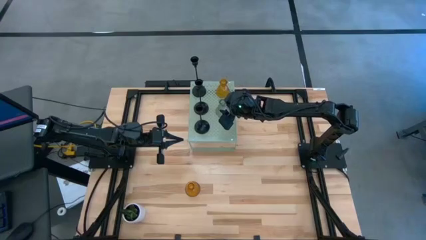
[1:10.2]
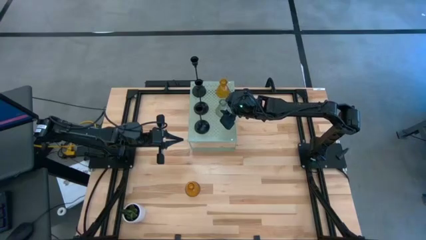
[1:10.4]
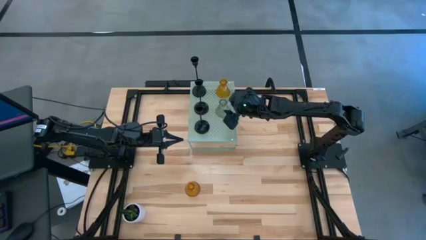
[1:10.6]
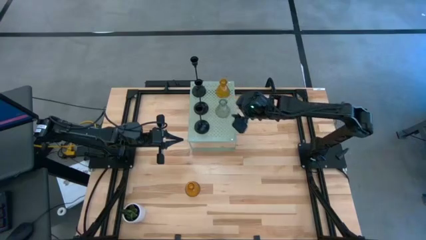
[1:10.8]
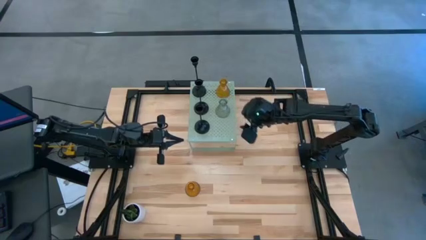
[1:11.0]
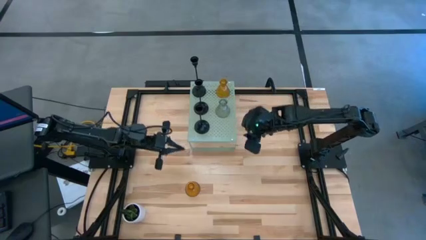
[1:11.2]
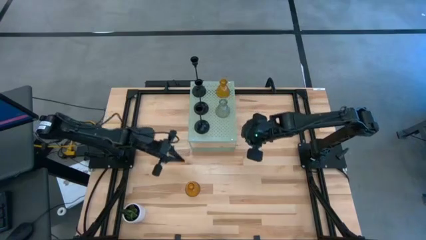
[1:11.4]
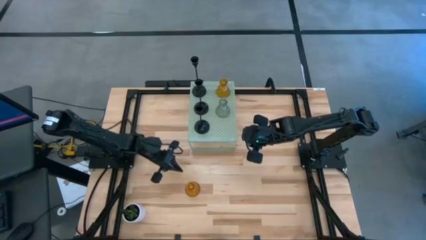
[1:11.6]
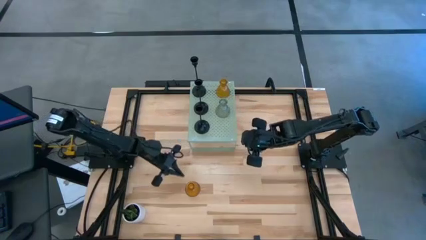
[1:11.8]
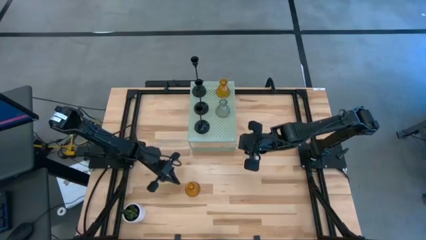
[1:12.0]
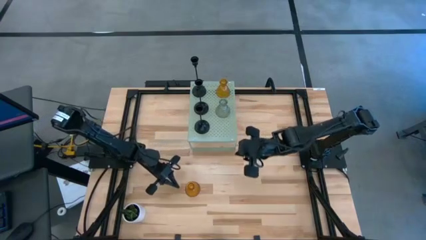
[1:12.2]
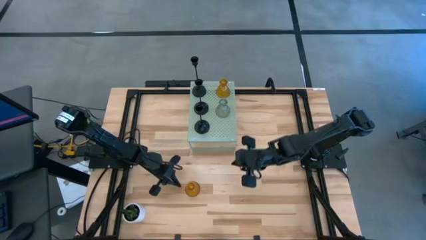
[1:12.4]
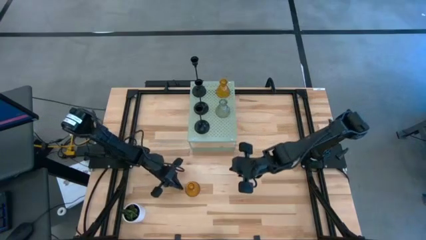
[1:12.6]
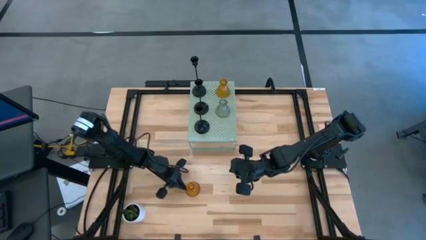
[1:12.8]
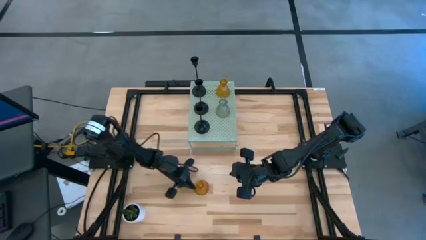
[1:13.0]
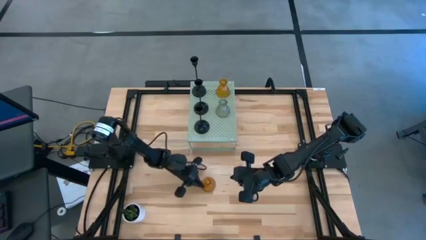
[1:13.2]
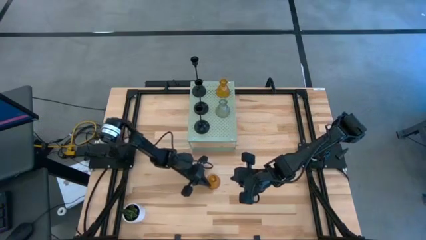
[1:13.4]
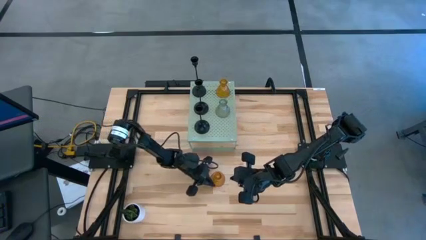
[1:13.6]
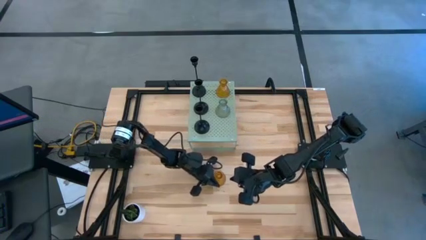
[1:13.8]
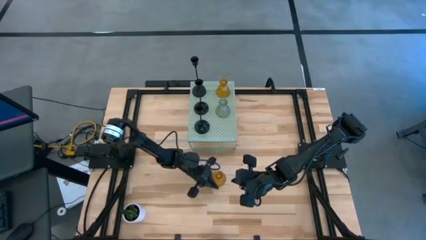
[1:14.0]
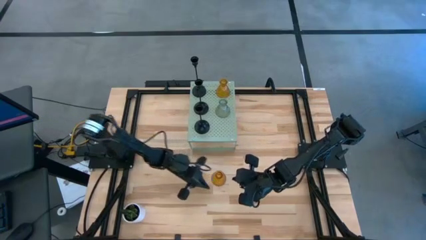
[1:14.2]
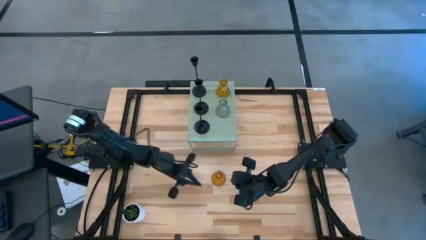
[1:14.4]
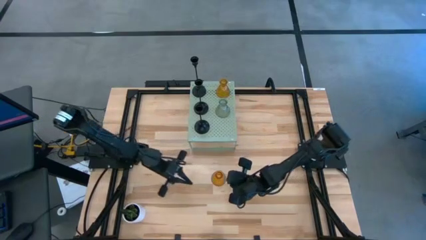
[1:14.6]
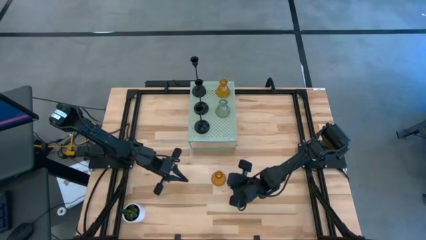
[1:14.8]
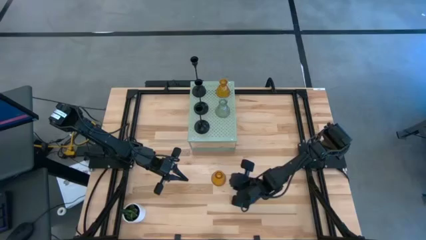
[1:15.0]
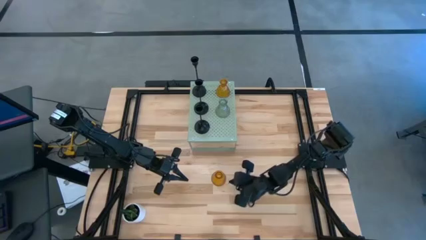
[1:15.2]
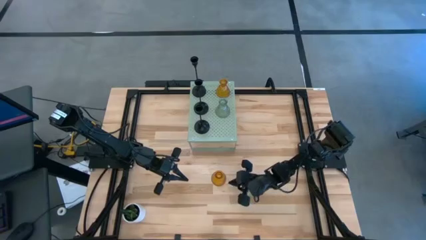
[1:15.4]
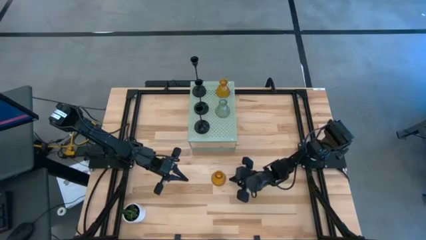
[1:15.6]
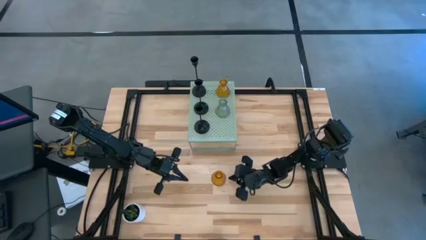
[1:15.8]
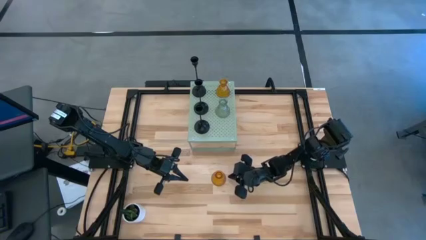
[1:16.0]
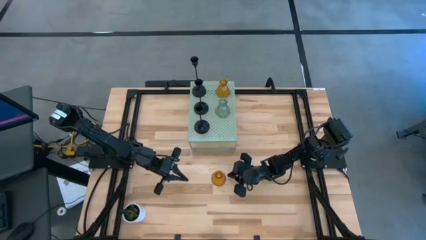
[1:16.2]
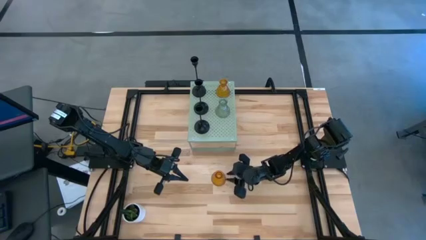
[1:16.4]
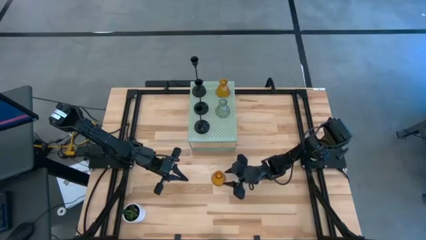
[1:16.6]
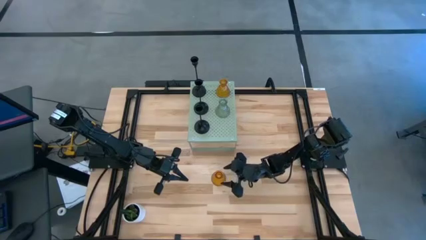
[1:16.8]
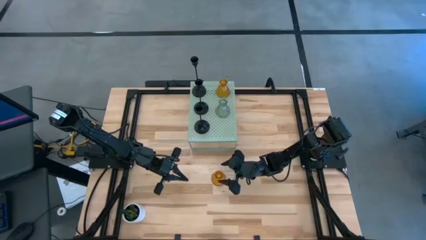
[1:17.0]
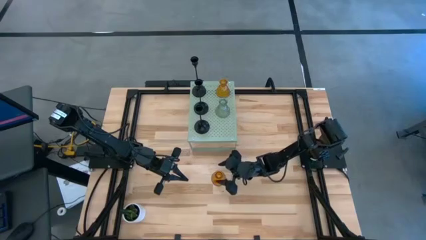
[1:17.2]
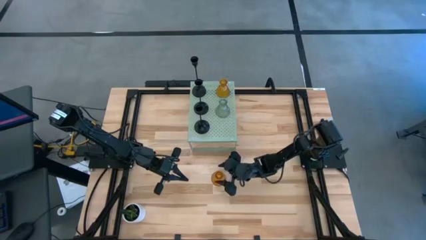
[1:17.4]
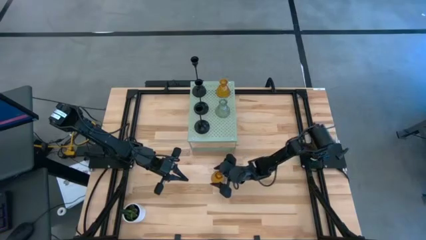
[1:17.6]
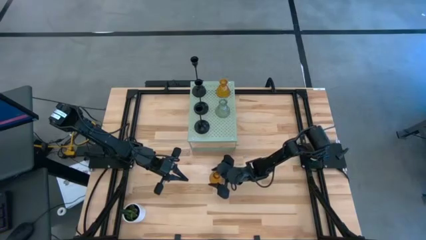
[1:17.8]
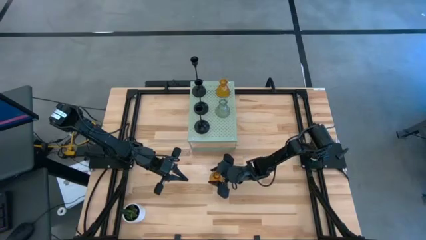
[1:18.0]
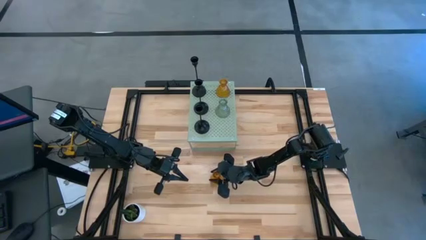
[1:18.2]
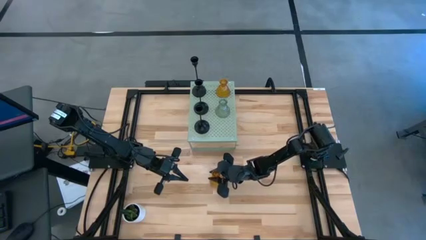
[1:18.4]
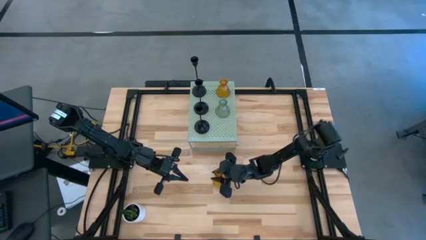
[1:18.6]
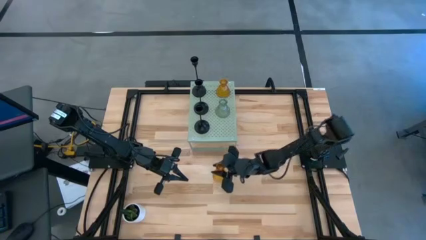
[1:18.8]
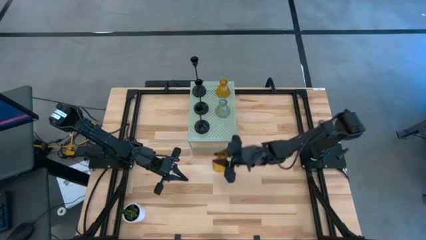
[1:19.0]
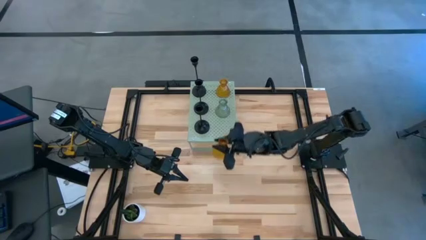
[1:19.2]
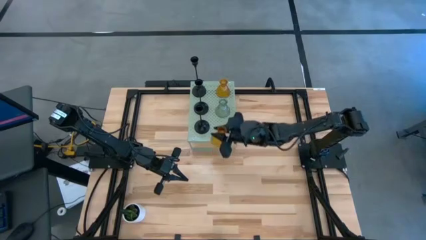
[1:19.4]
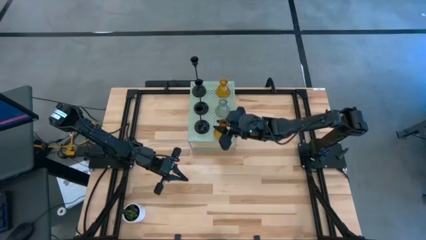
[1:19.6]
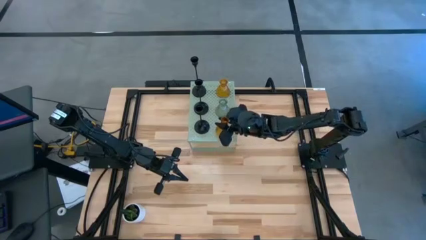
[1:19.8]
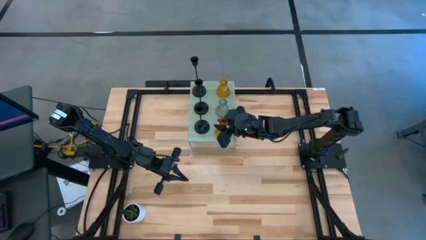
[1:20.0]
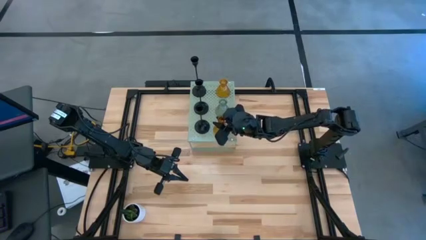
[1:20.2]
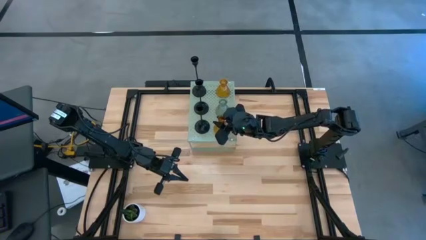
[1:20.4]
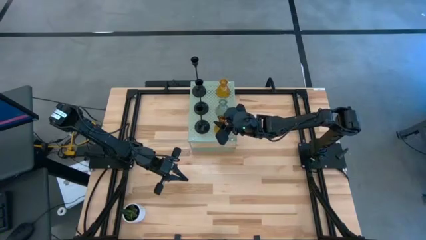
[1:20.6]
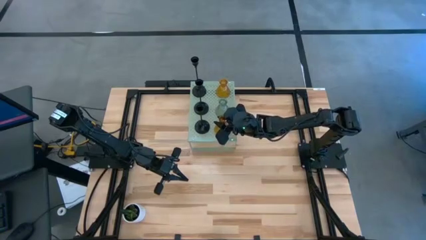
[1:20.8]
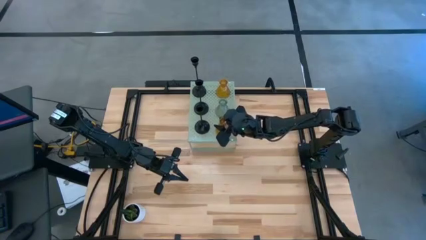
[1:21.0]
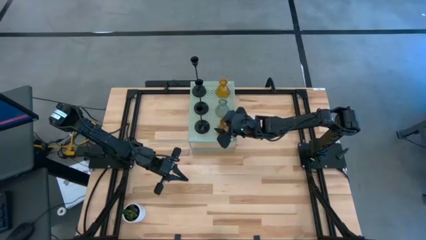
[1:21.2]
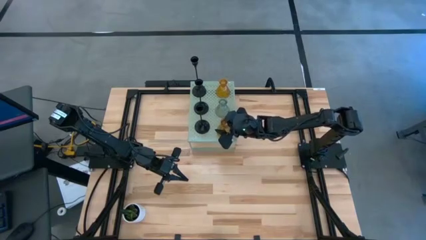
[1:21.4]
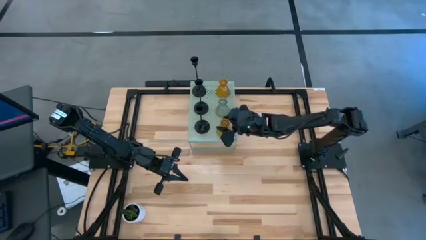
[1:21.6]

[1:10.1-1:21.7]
Task: Pick & Place candle stick holders
Put the yellow glass candle holder on the shelf aligned with the other green glass candle holder

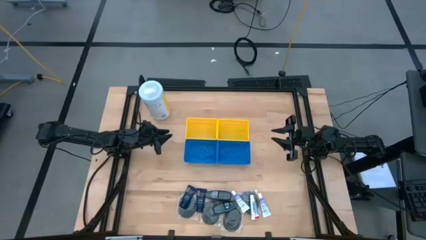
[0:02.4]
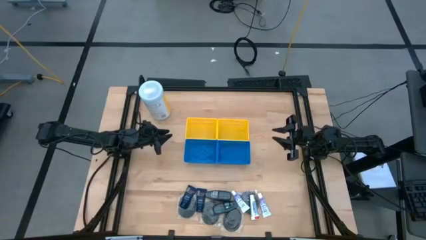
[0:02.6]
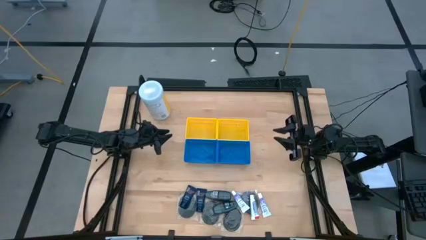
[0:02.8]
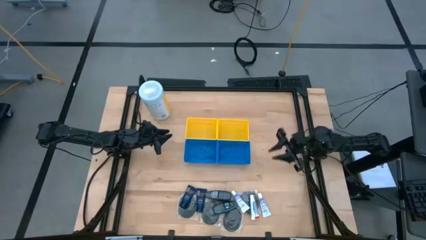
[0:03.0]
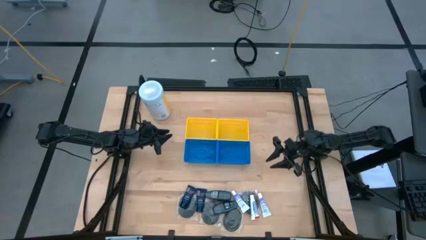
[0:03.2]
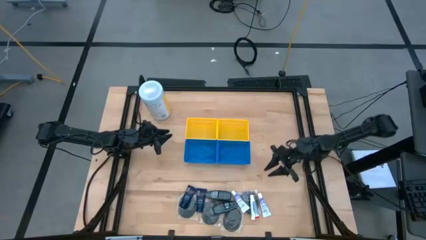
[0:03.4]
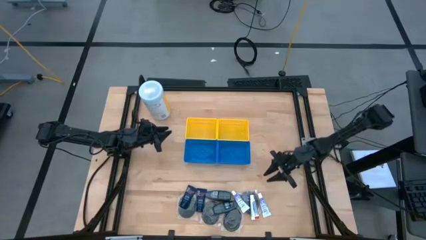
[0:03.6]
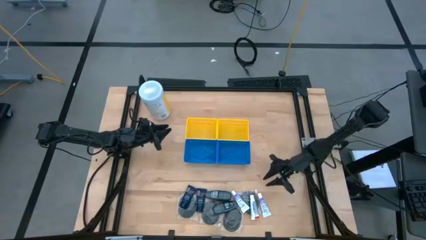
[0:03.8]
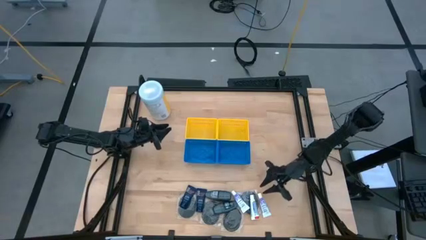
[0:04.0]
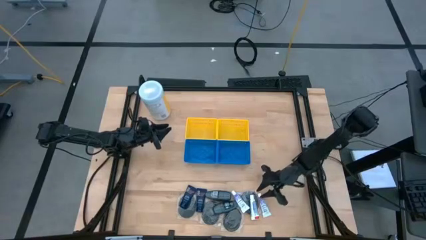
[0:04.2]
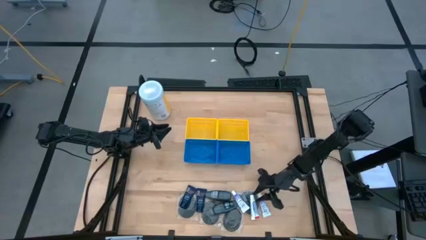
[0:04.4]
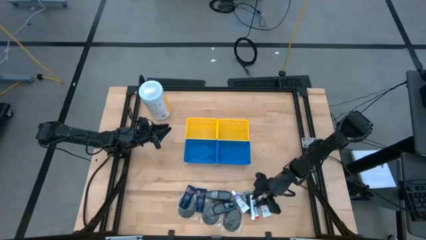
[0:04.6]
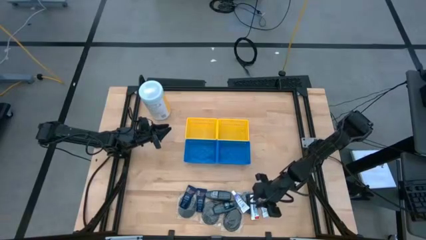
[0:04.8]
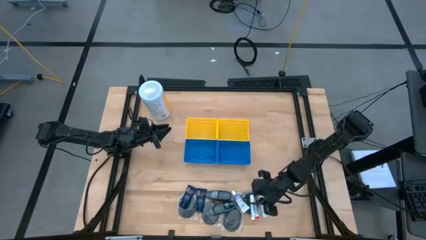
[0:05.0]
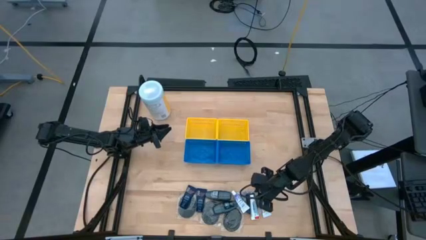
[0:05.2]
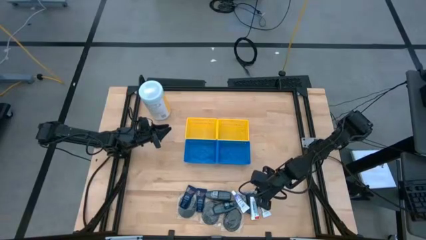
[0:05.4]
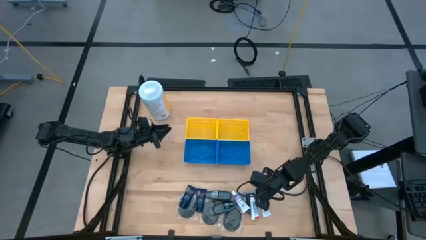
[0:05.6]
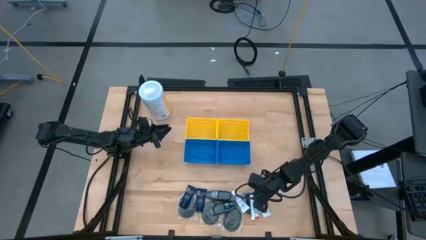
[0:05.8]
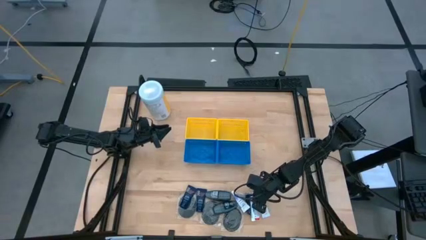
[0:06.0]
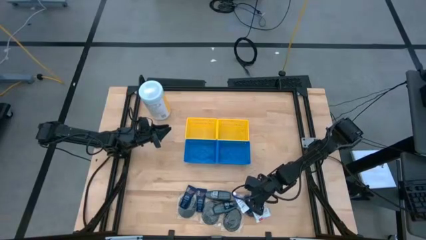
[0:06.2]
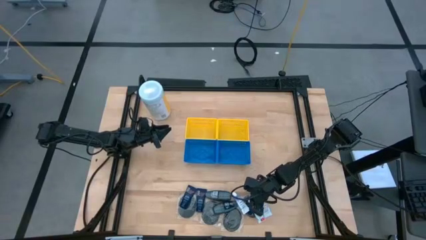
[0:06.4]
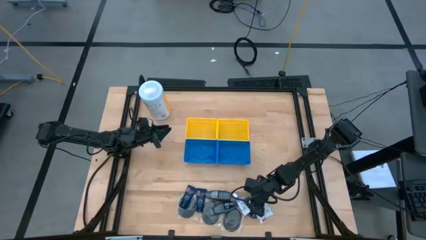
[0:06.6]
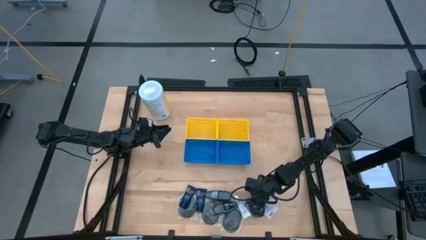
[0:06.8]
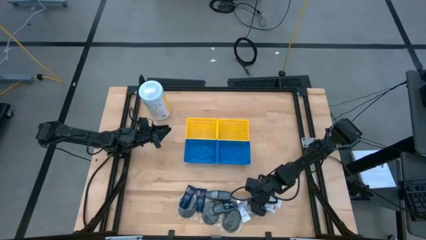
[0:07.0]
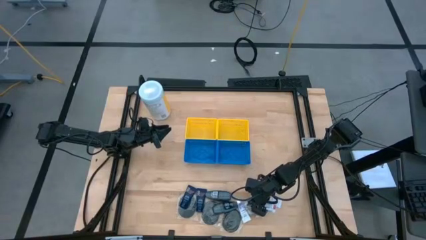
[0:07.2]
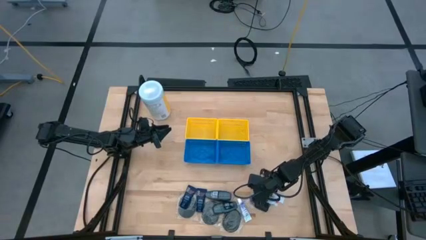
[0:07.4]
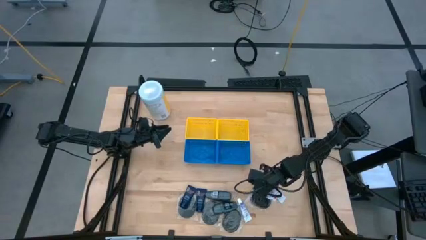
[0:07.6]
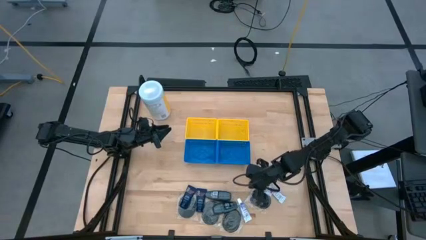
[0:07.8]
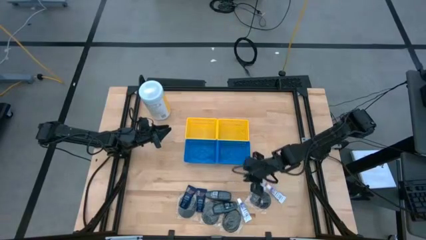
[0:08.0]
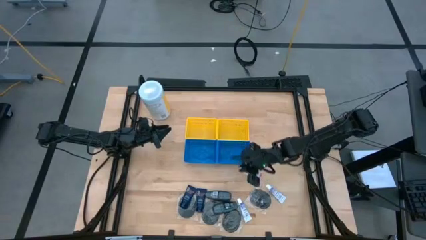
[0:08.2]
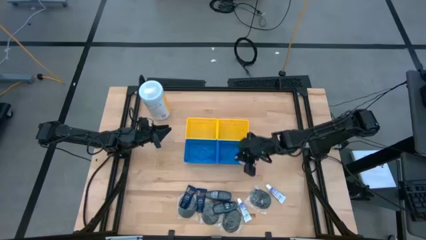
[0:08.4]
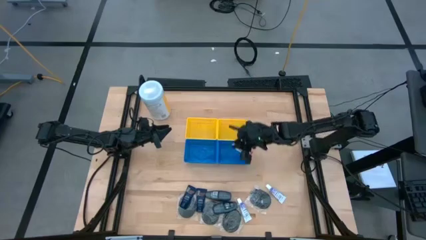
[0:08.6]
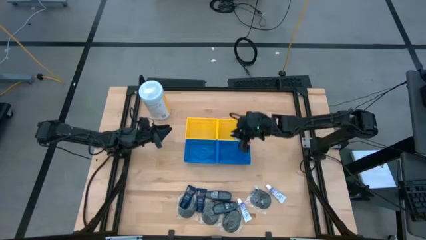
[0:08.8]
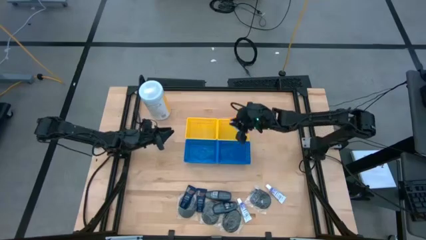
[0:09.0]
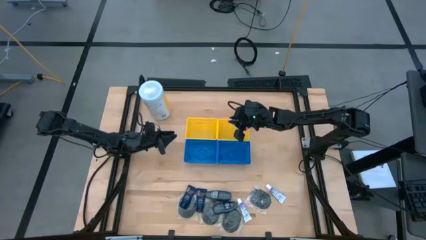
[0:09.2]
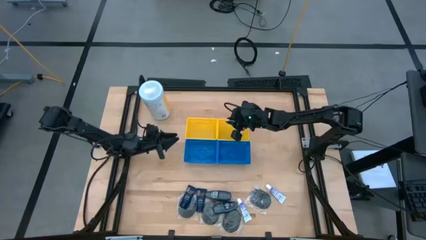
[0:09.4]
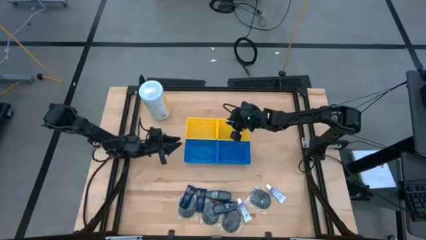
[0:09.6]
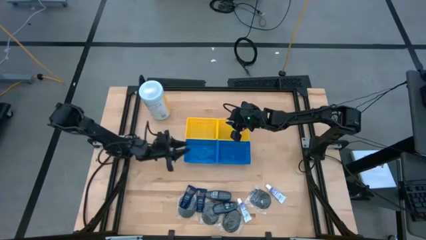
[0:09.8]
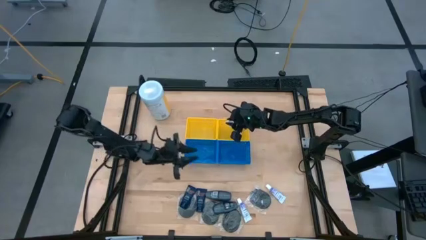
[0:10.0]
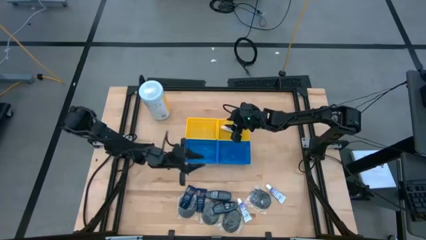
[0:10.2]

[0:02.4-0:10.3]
Task: Pick & Place Travel size toiletries
Put the middle toothpaste into the right yellow bin
